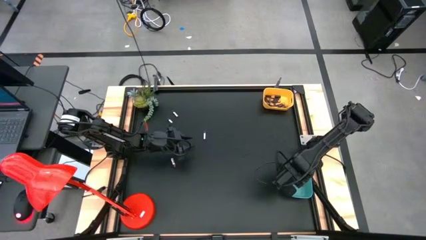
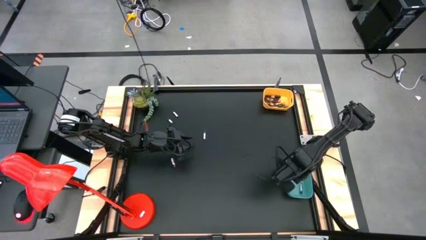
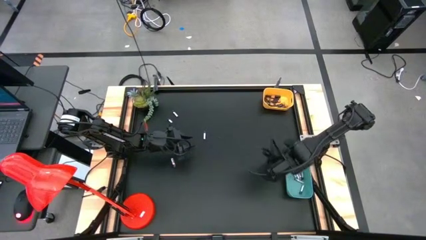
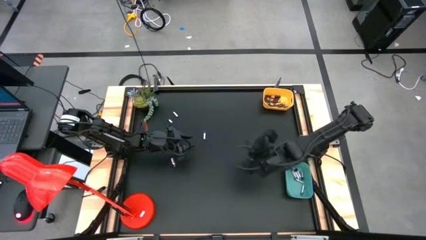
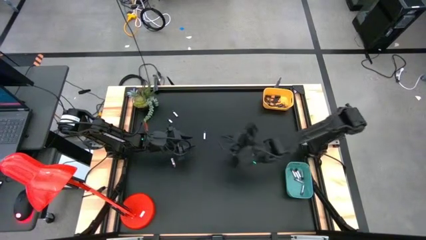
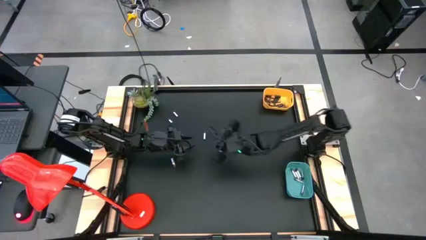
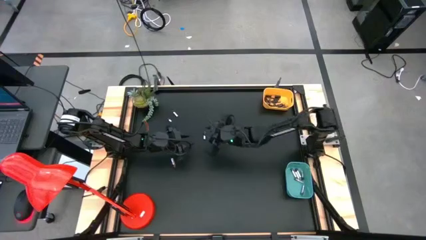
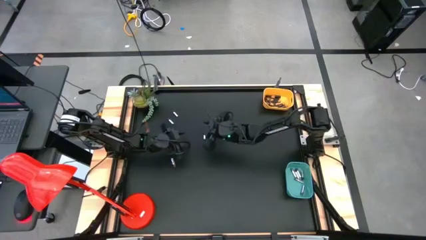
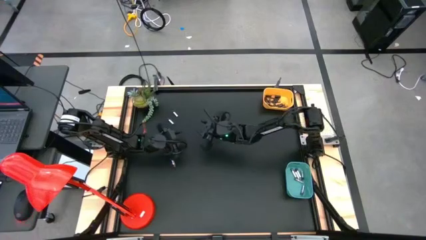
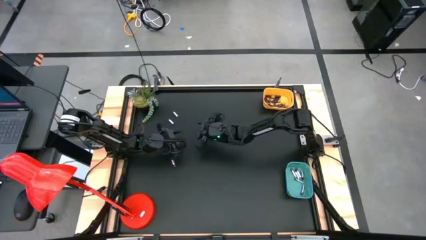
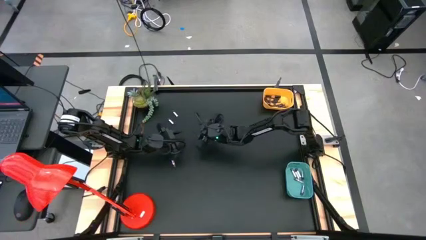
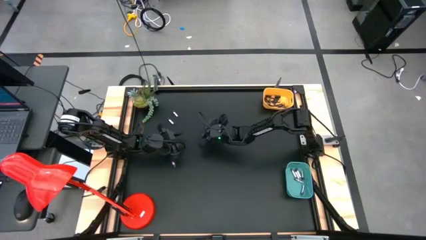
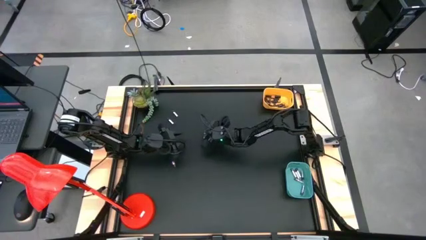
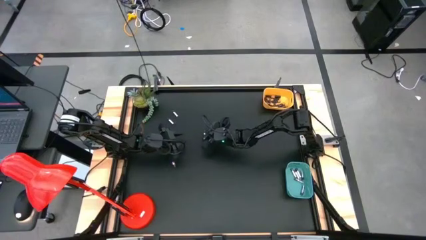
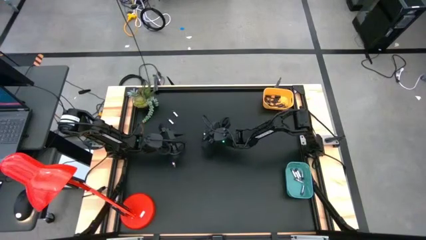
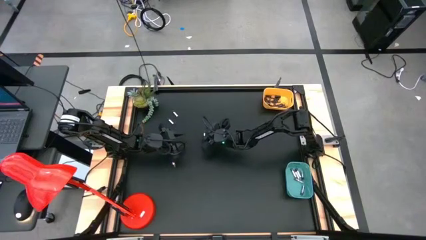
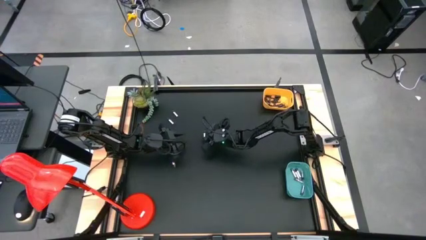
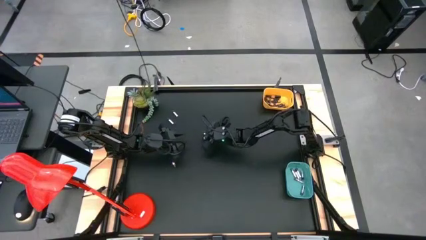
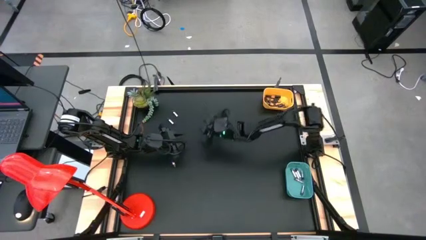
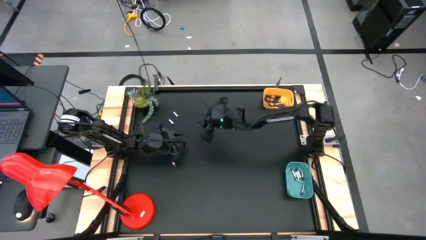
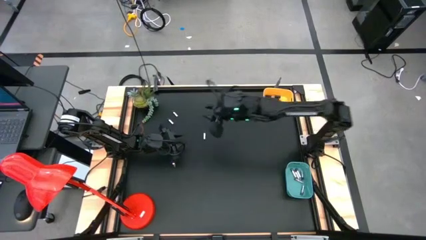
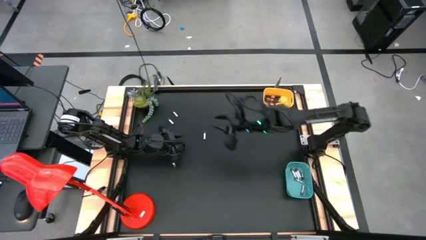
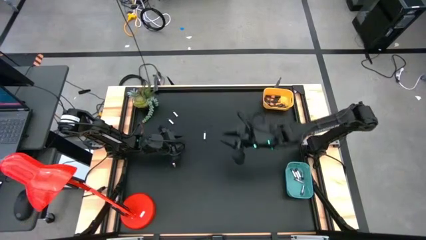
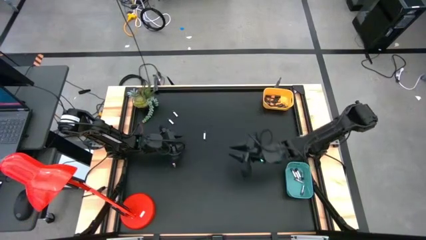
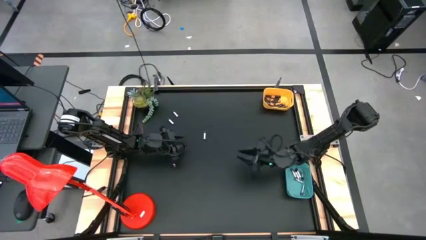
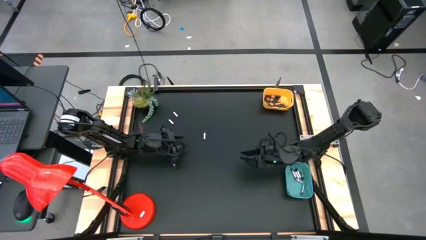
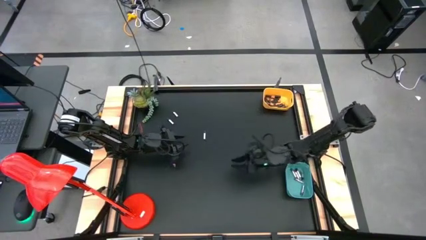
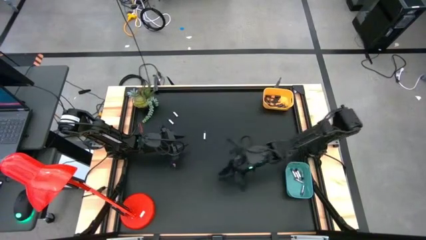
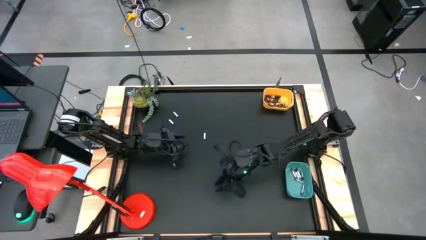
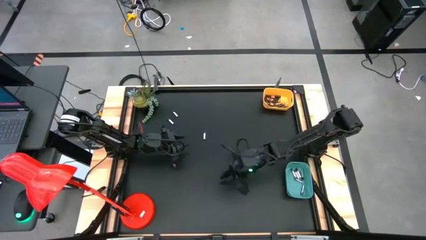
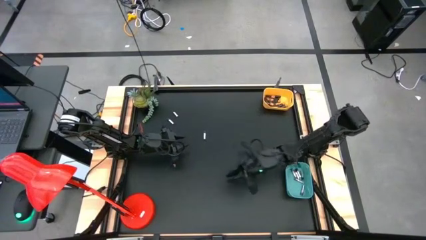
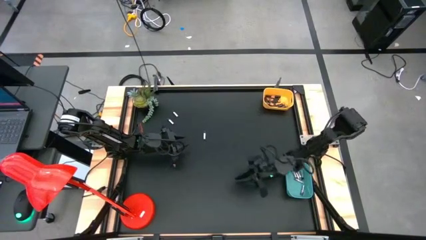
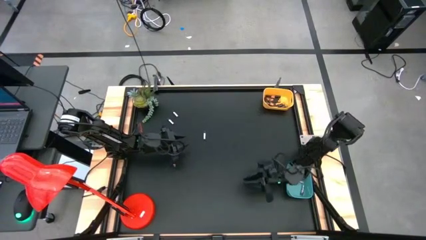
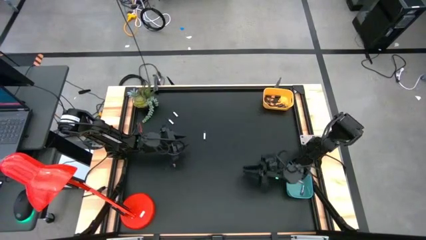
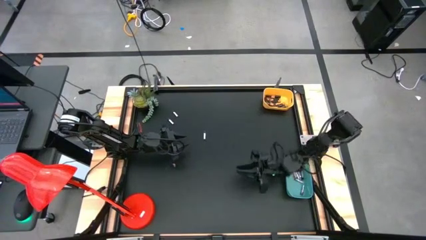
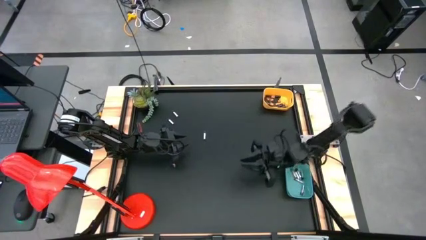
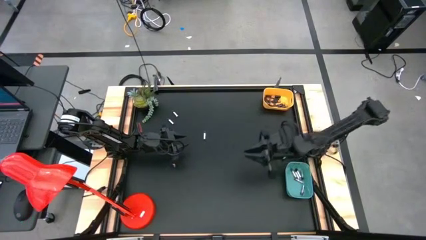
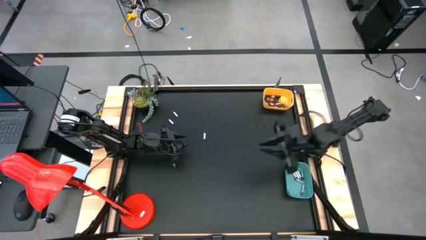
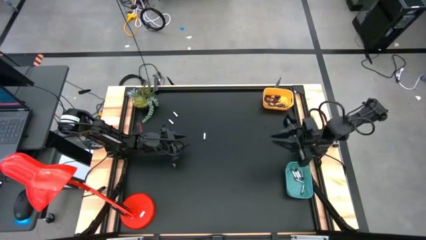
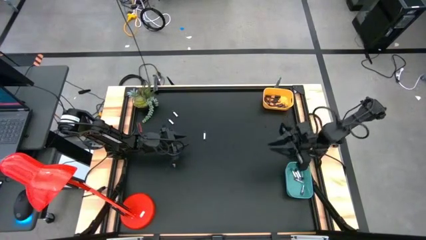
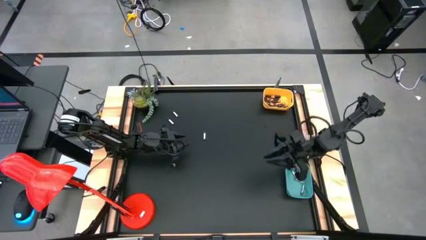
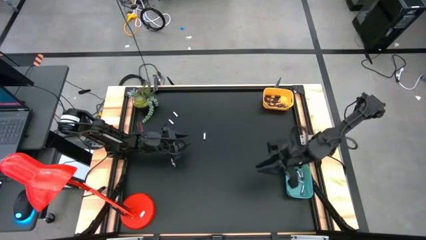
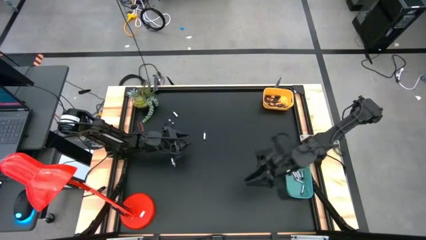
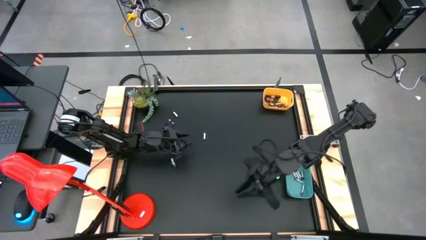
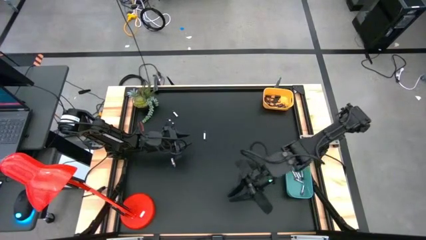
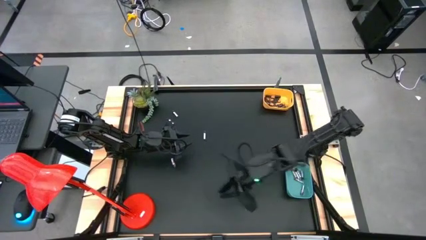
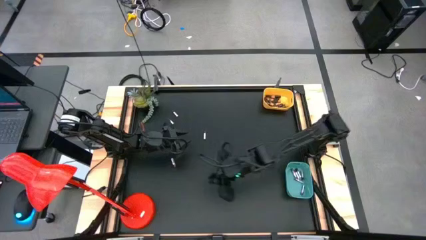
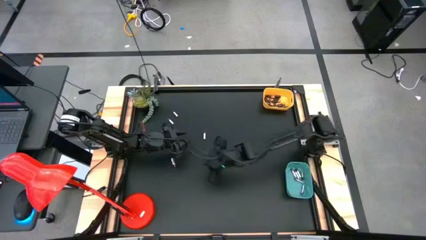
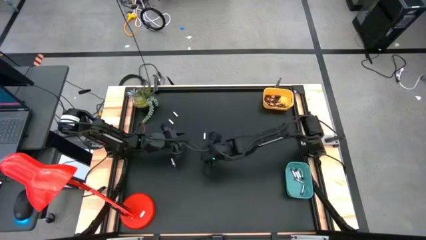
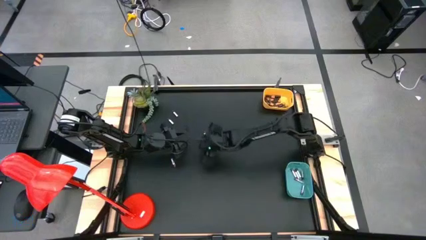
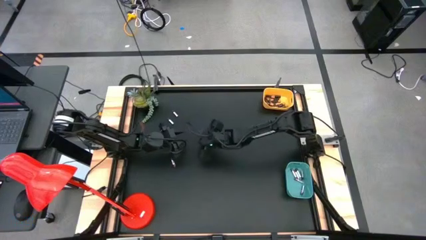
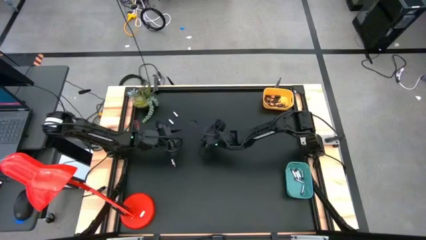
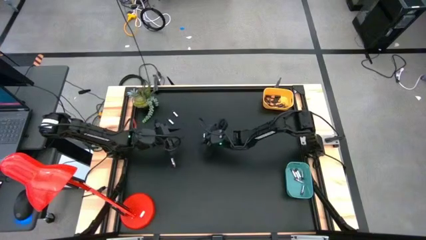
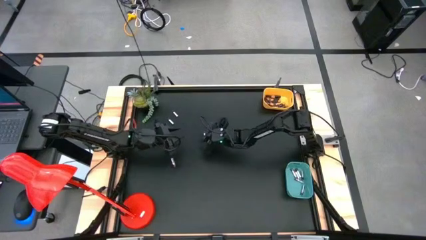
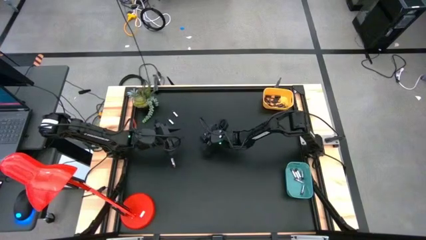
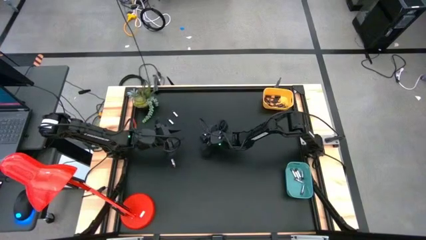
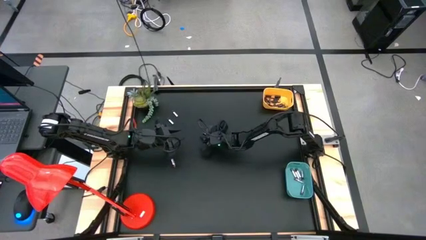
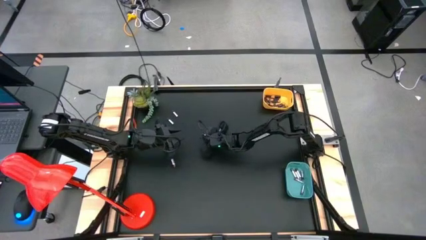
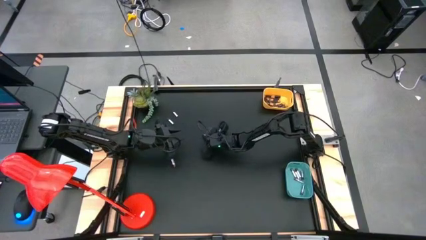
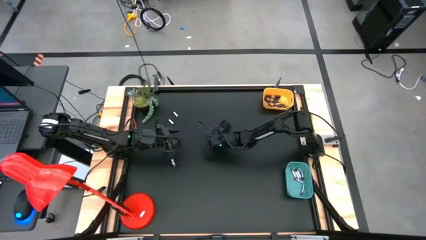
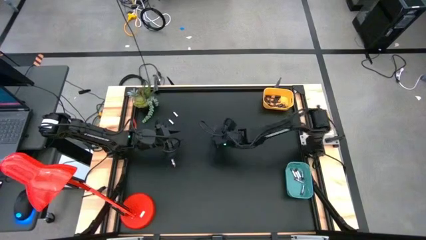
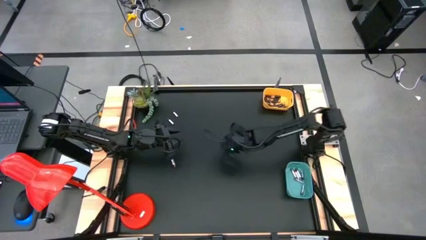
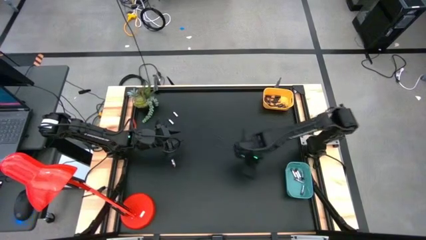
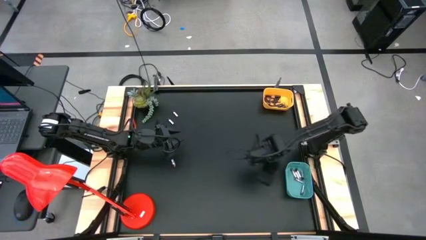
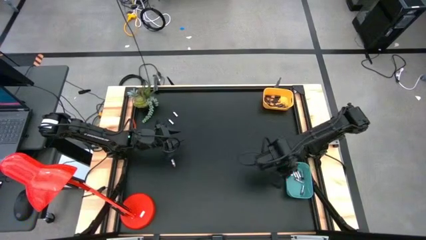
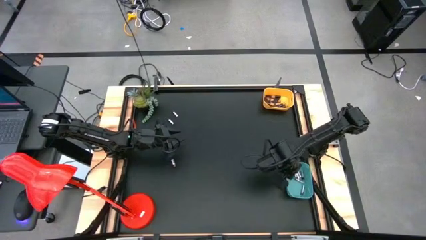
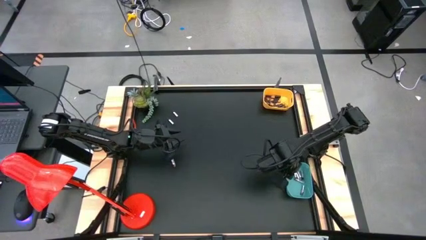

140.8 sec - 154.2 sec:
Task: Sort batteries
Put the silver battery into the green bin

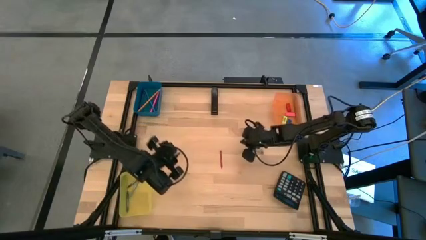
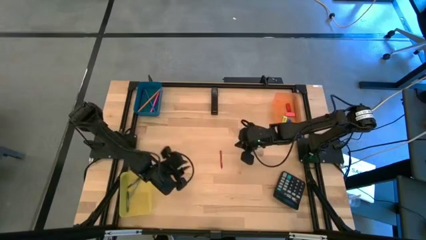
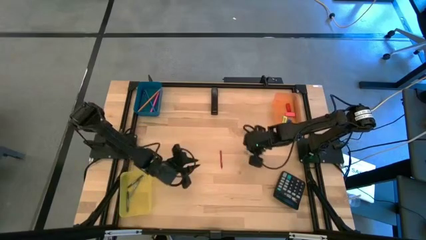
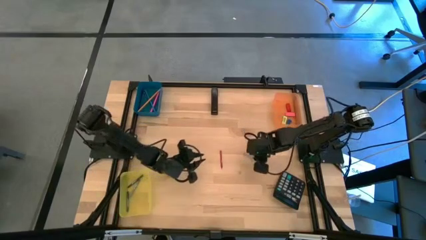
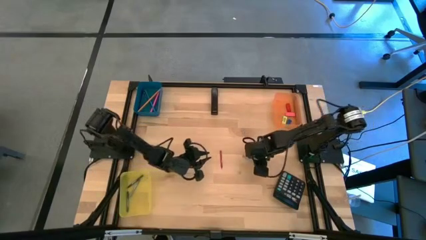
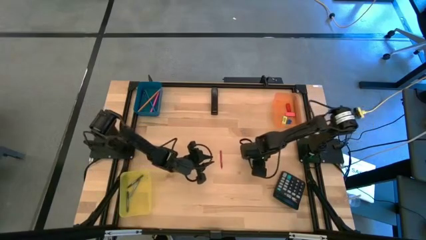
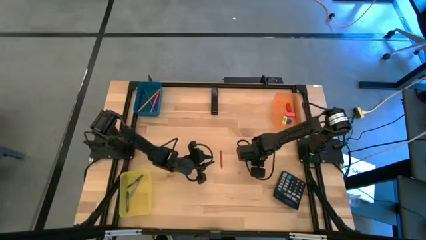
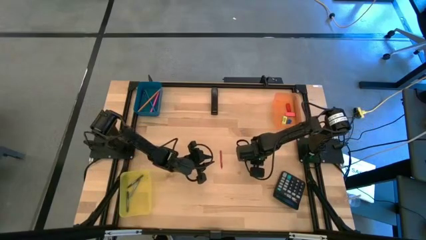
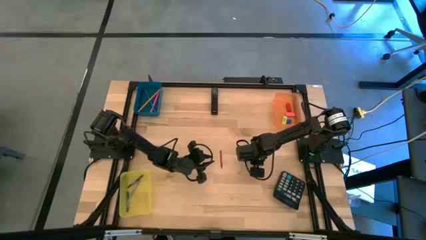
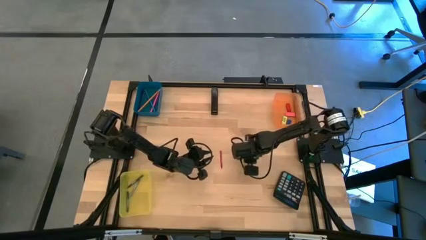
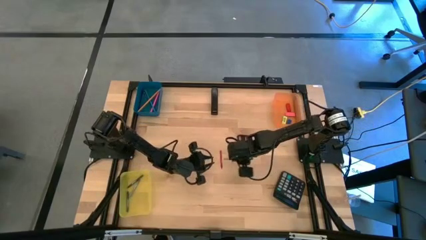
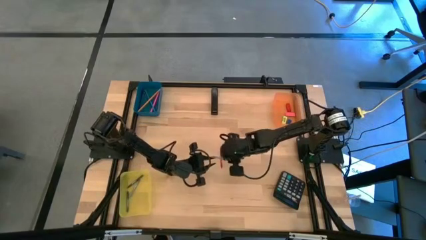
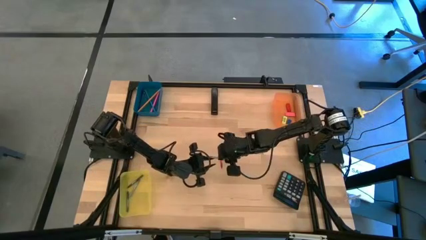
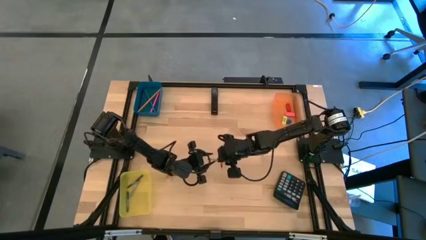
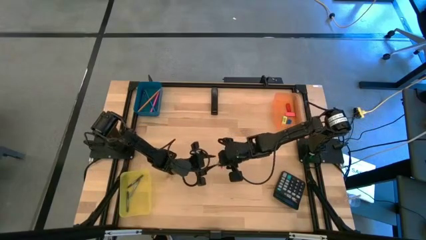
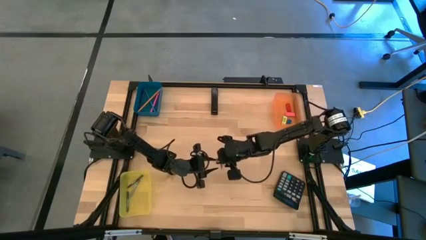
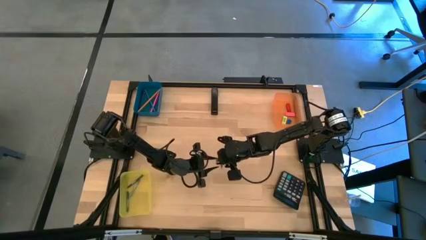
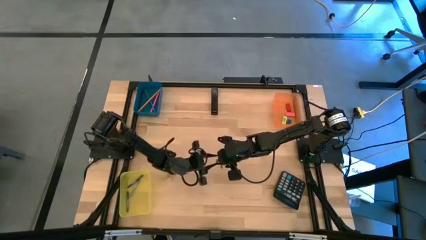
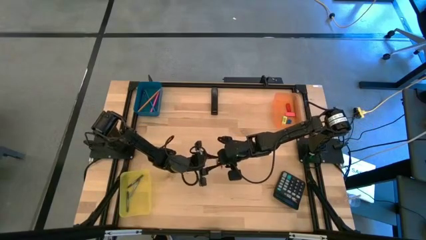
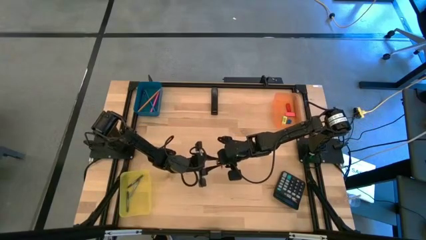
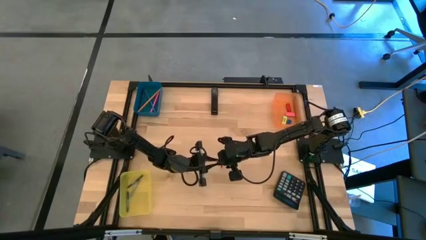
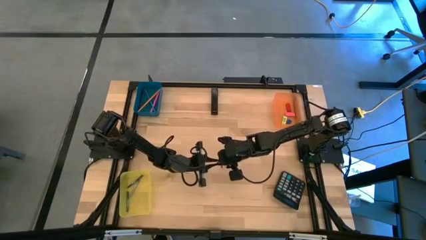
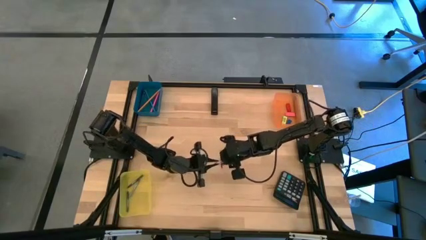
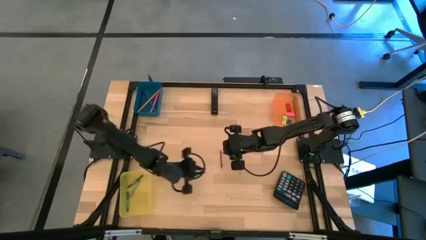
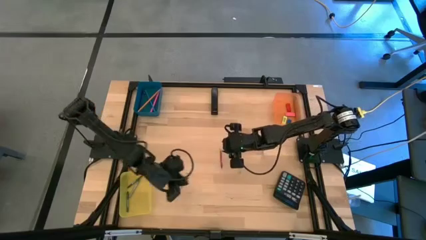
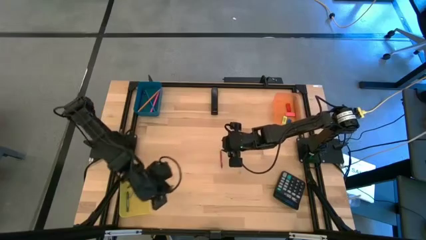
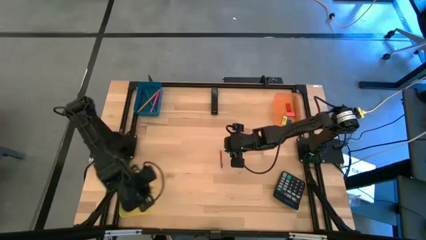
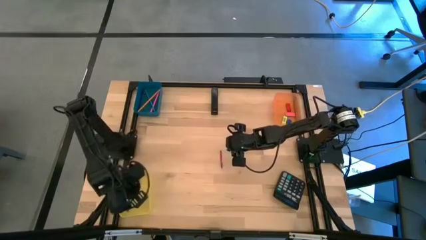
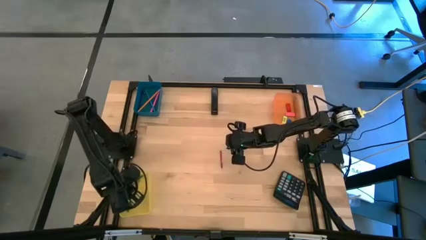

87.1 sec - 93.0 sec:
Task: Sort crayons/erasers/pens/pencils in bins
Put the gray crayon into the yellow bin
